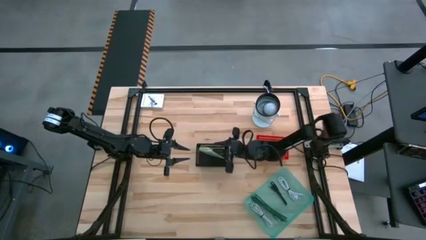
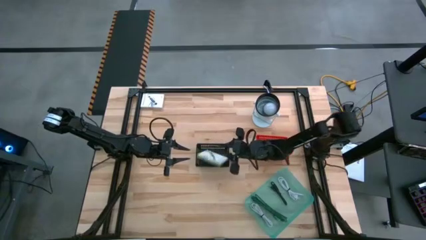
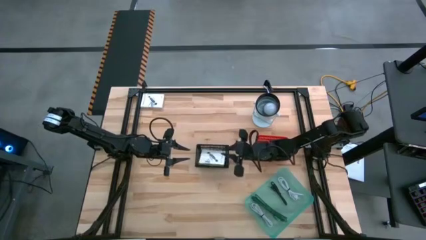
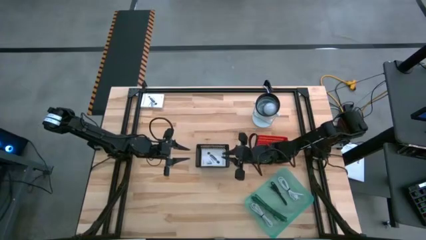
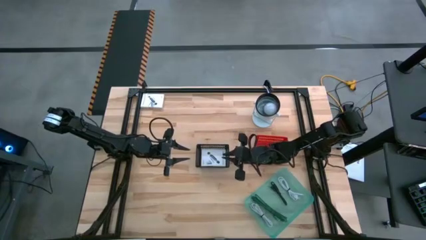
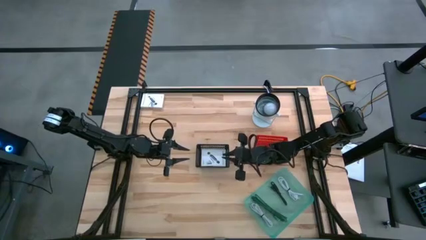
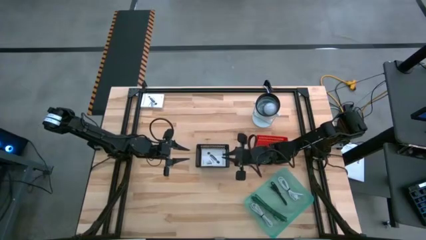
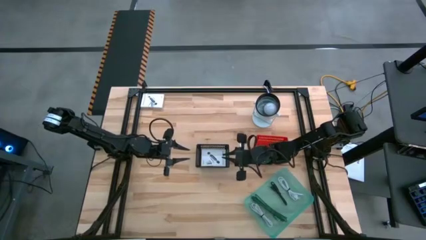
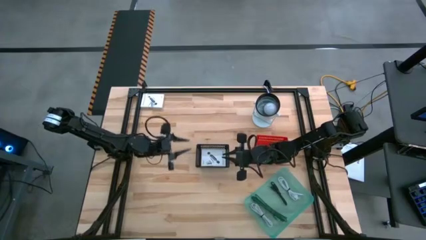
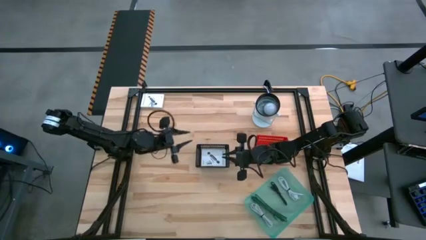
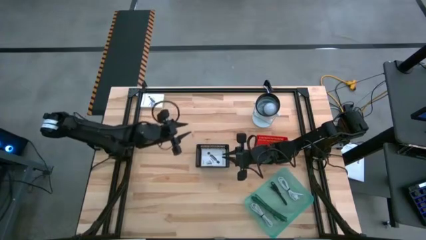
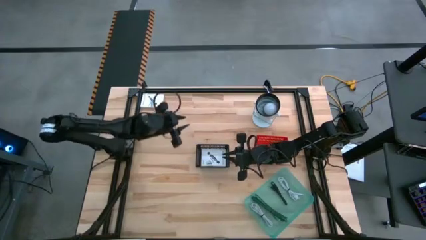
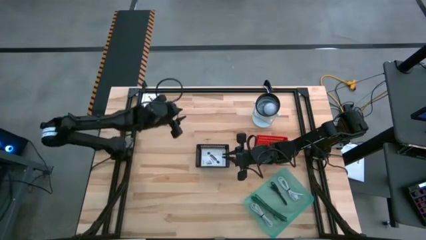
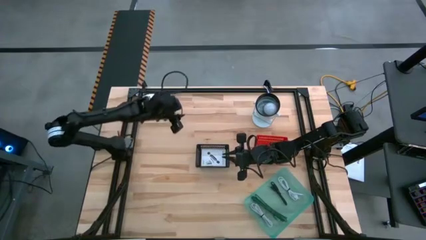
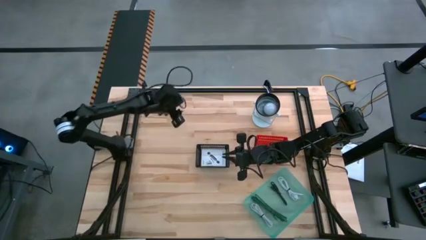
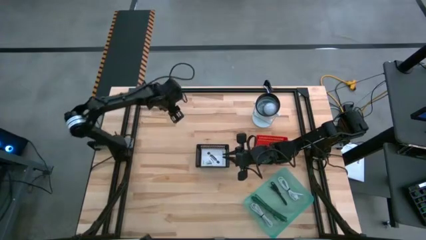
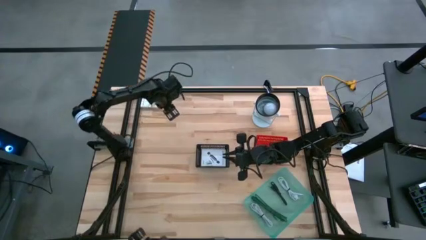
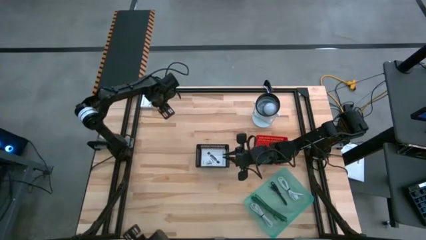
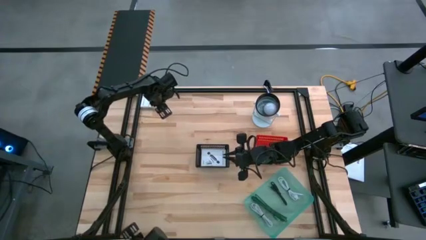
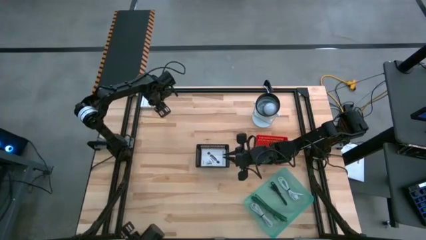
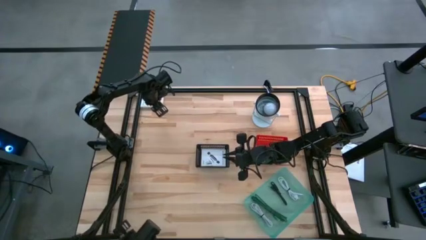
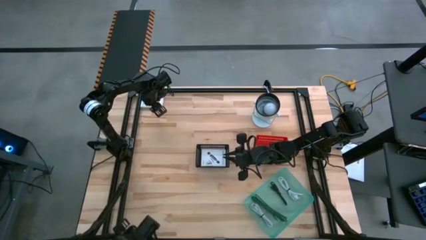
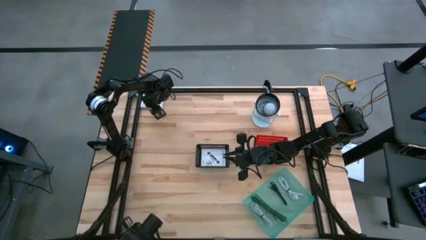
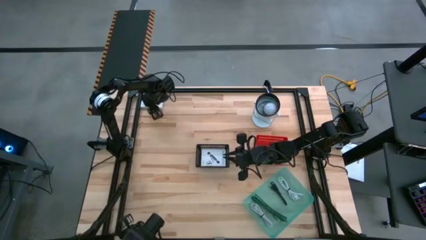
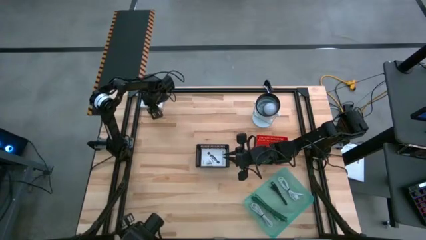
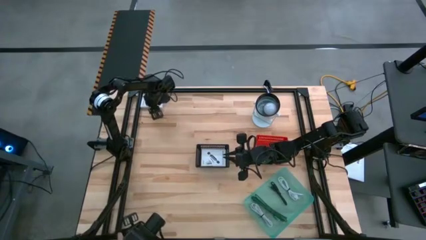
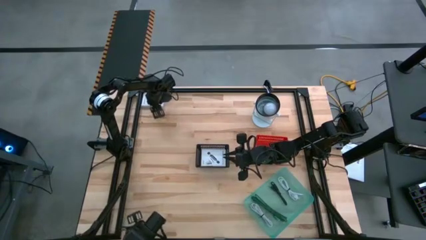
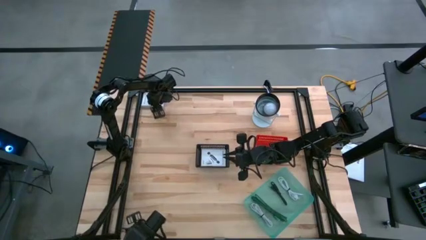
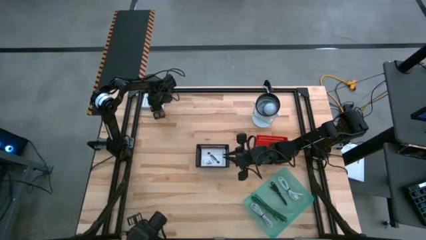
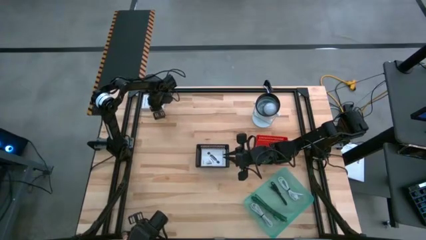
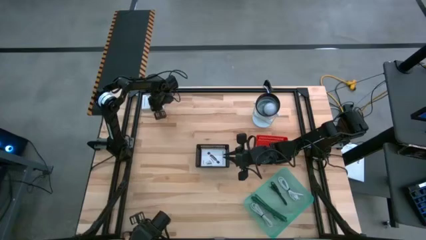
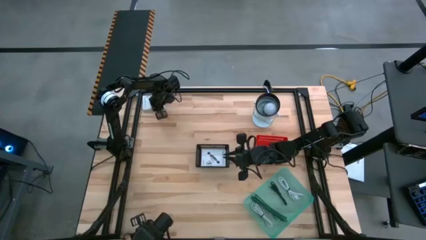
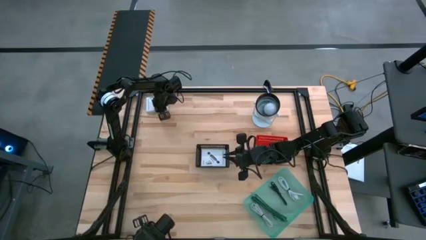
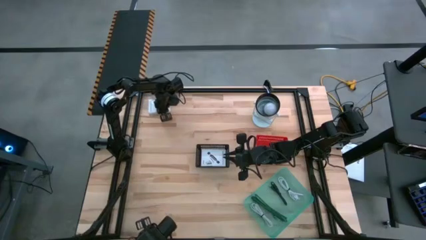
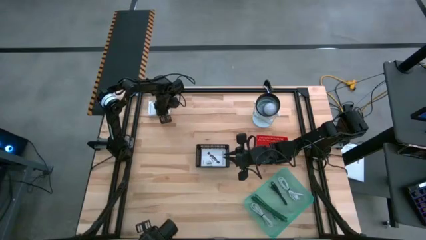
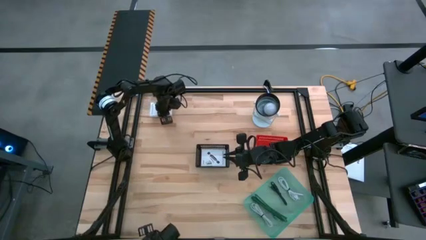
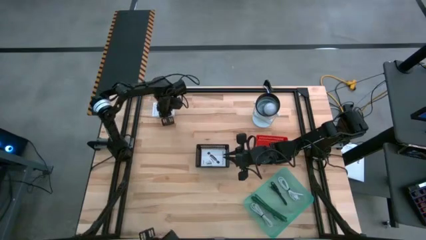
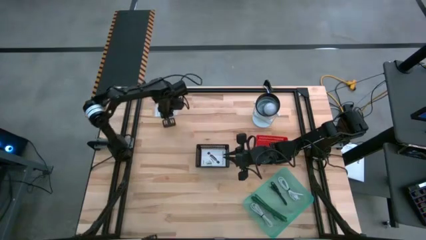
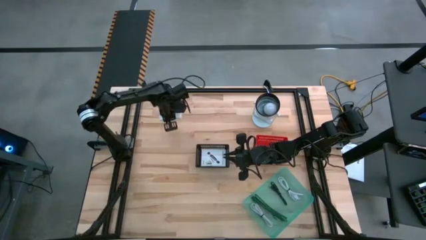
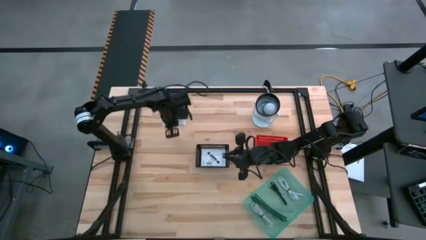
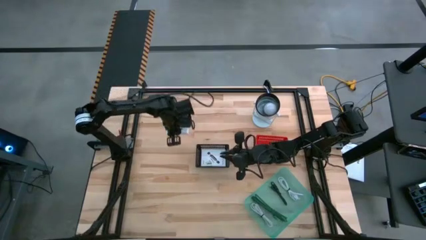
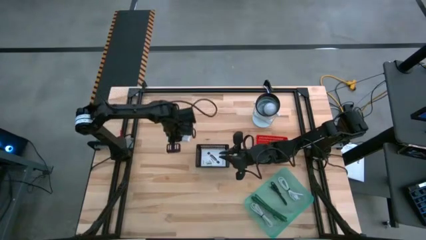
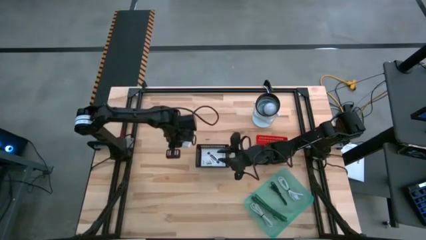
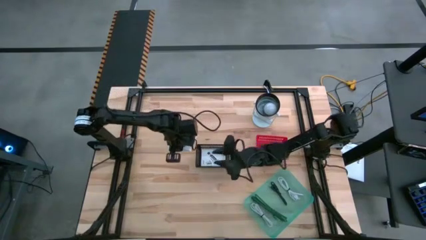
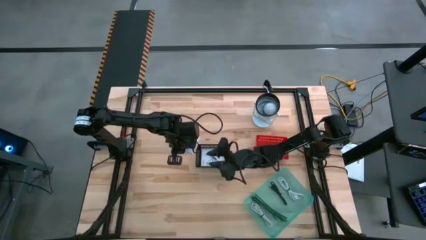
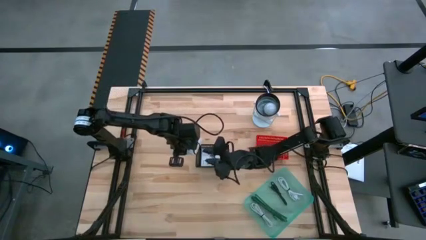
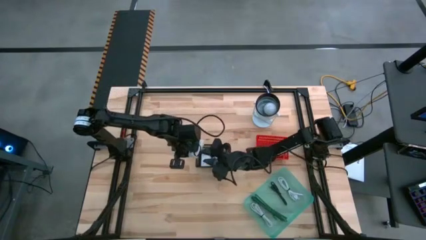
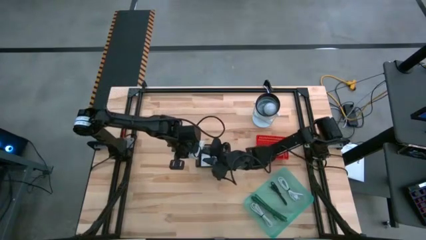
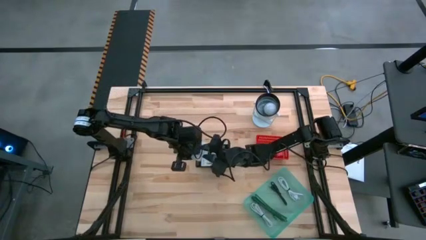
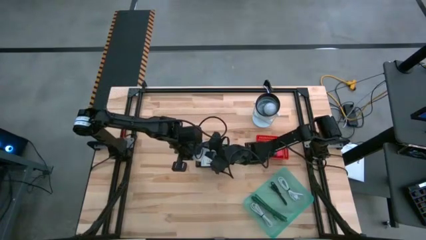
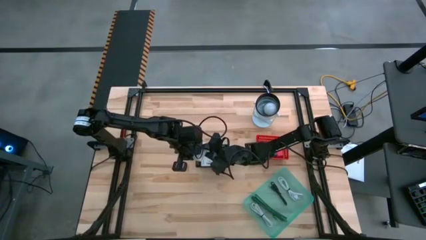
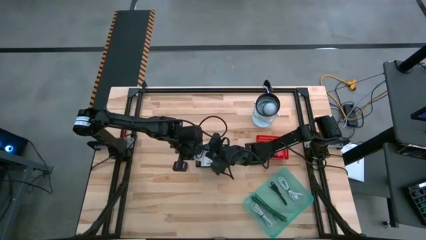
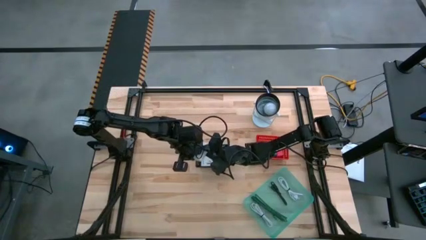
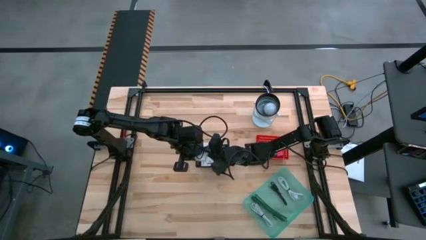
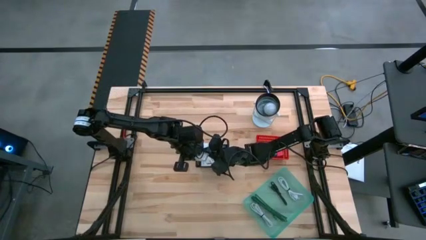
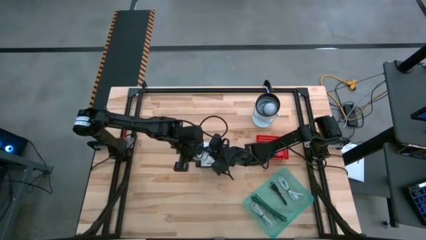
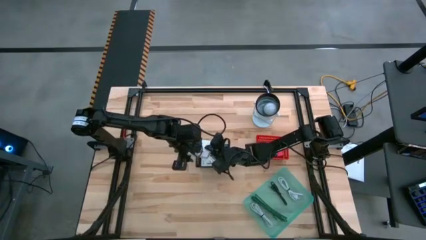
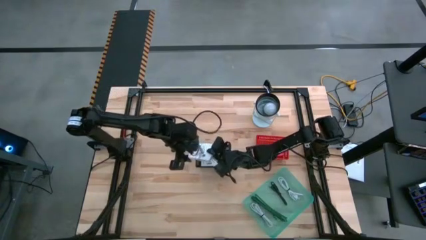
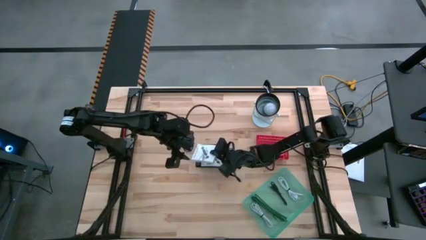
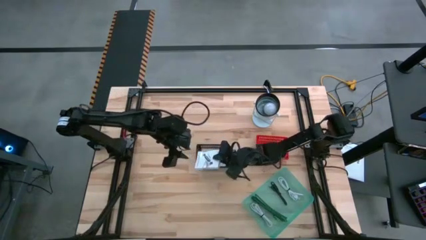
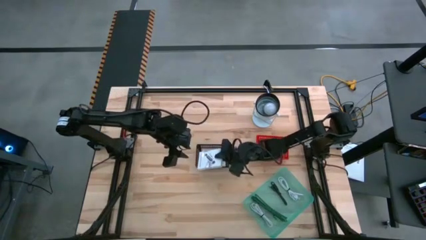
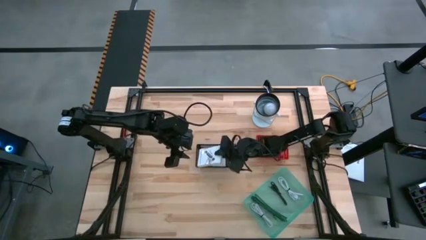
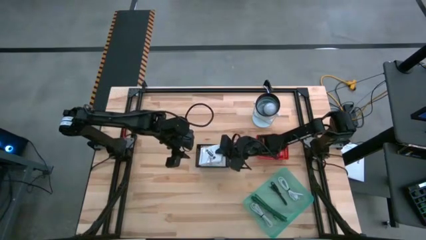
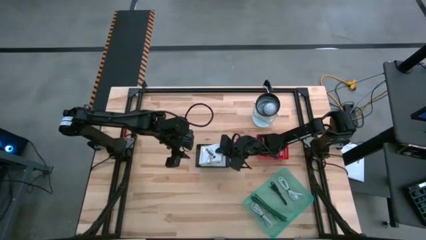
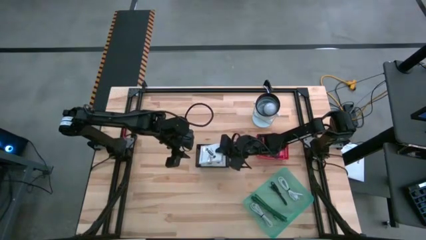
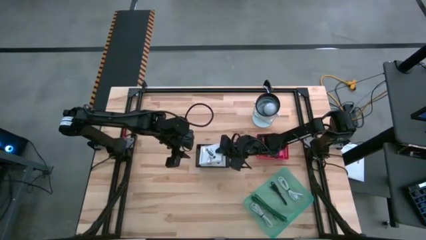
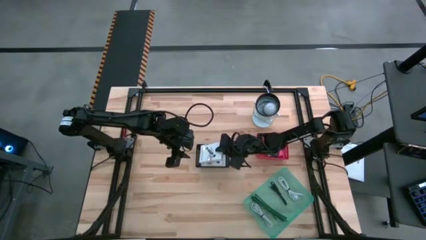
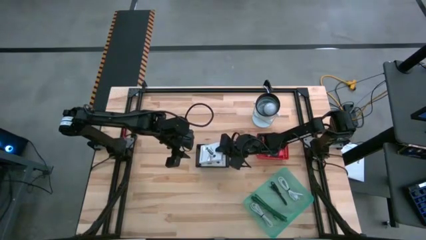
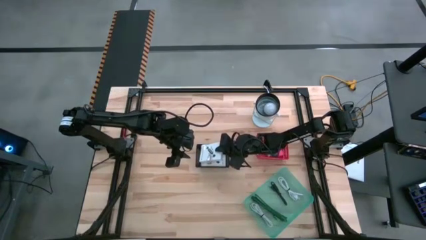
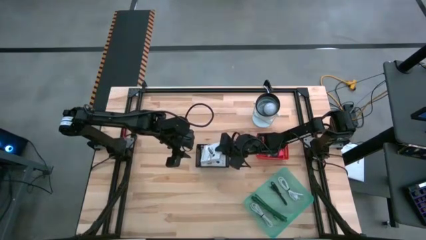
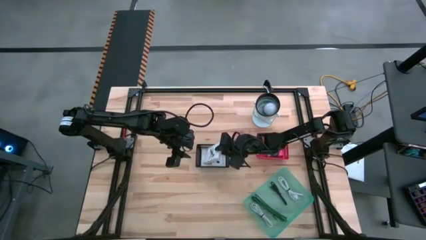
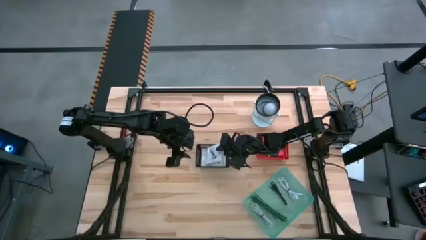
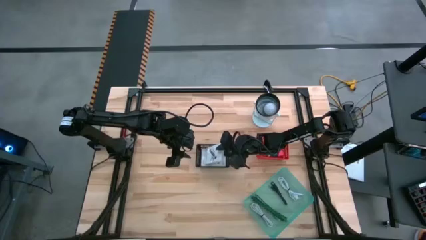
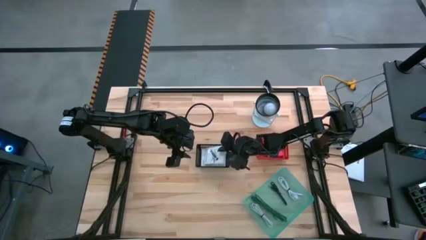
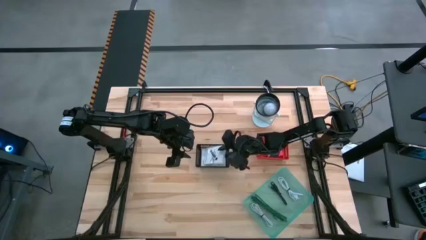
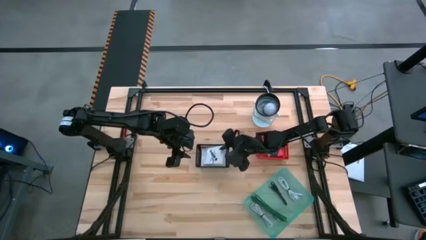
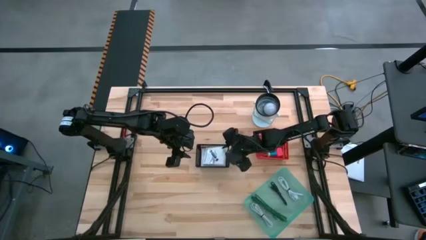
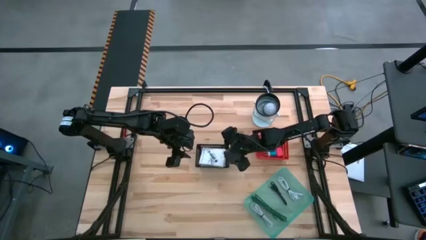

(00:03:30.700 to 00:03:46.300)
Task: Pick and place items into bin
Put the white card reader box into the black bin

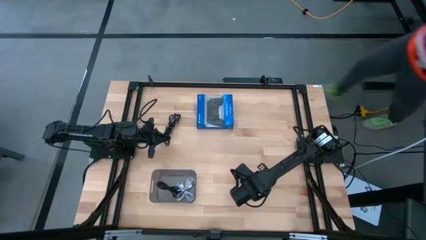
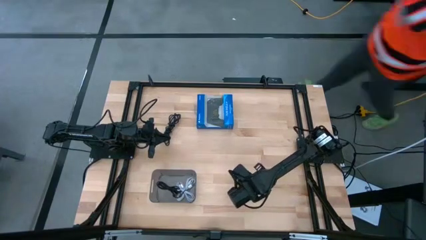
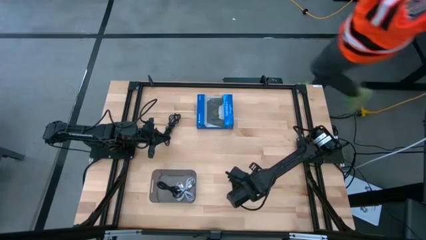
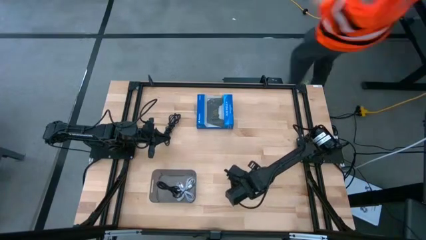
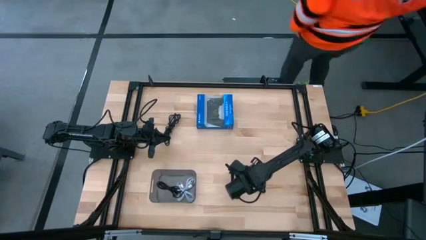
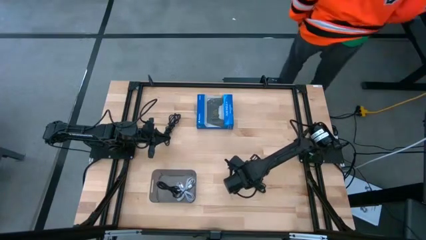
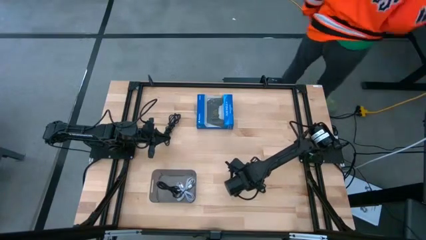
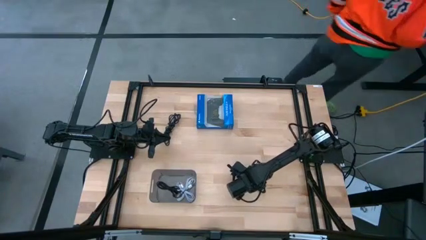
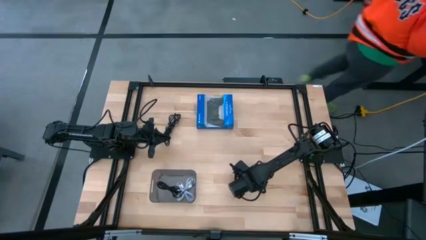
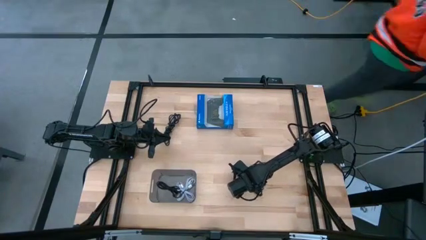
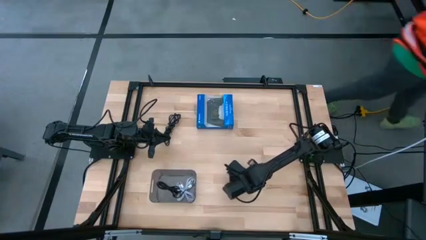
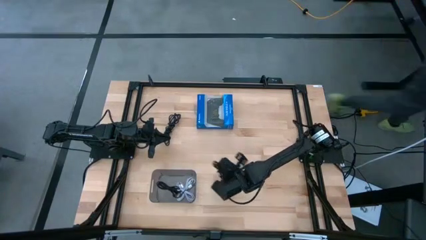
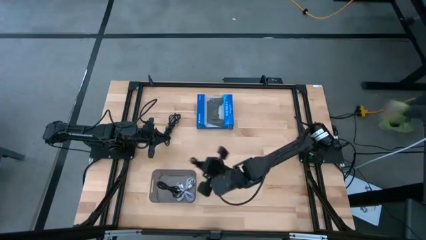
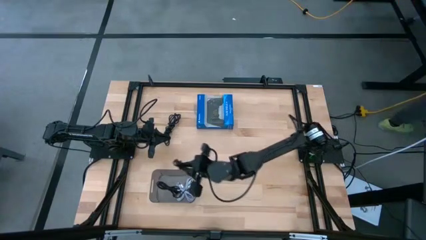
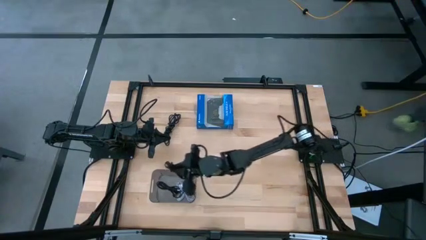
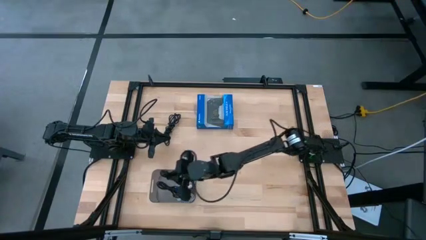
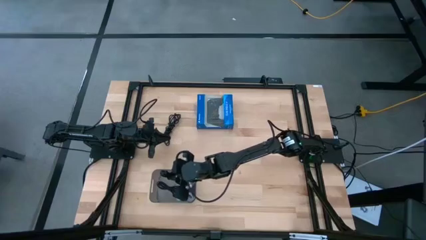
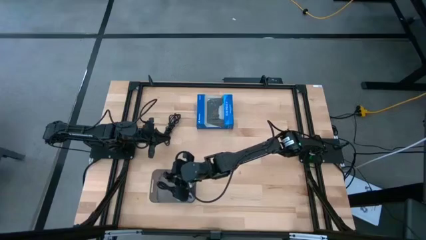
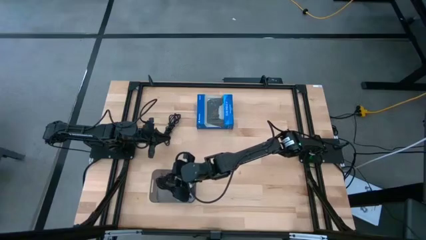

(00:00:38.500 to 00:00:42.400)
Task: Pick and place USB-C Cables
Put the right black charger cable into the black bin
